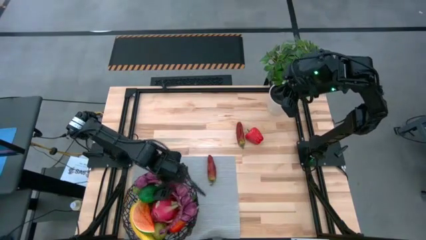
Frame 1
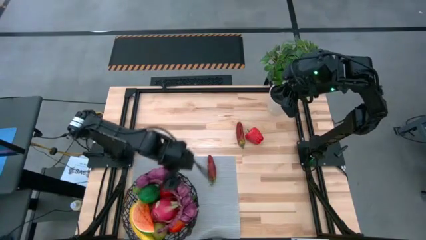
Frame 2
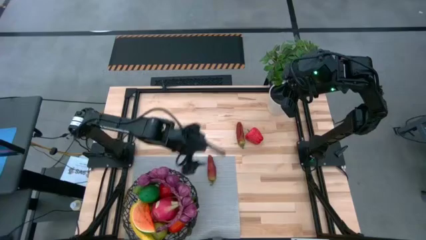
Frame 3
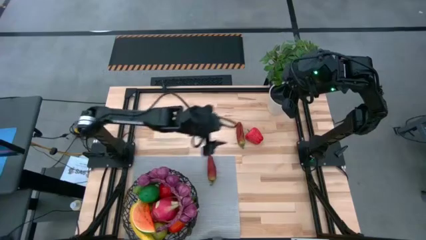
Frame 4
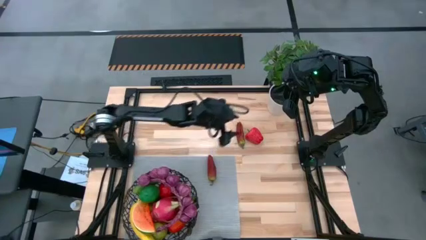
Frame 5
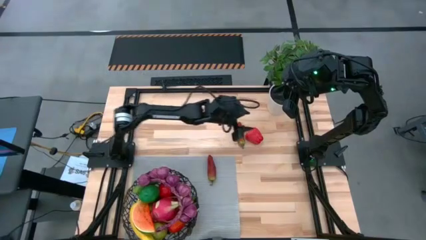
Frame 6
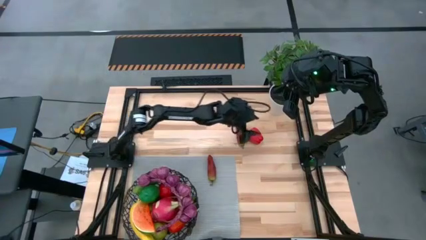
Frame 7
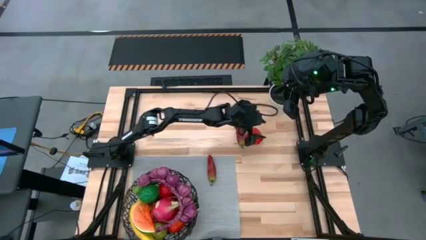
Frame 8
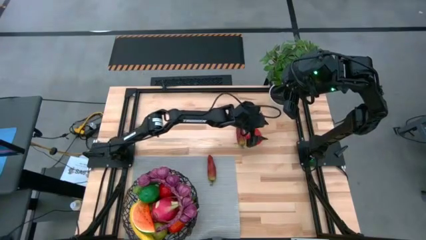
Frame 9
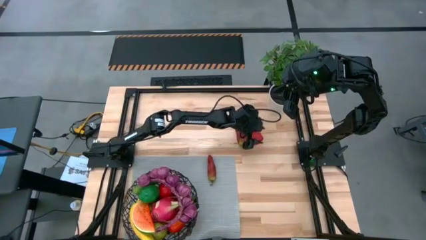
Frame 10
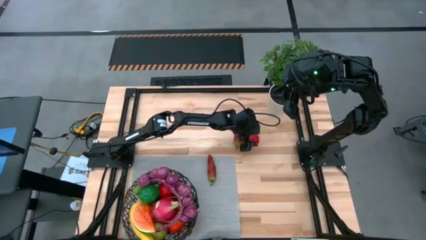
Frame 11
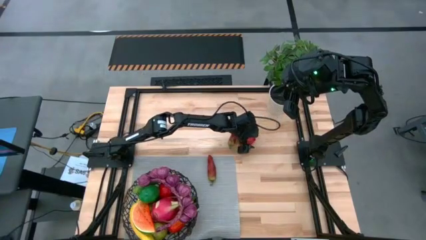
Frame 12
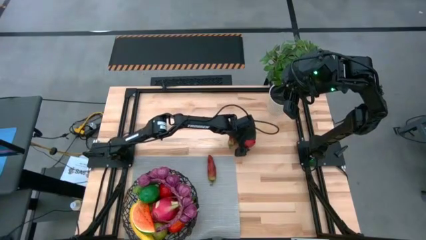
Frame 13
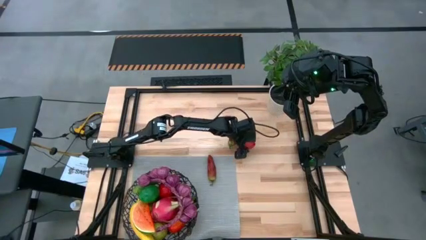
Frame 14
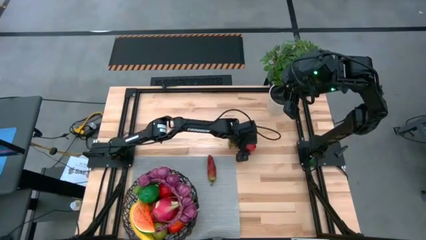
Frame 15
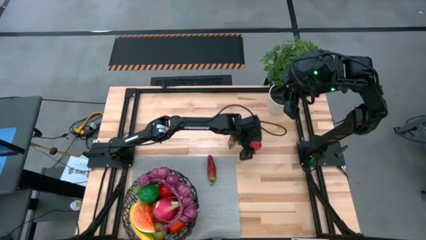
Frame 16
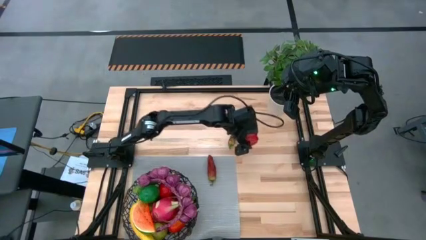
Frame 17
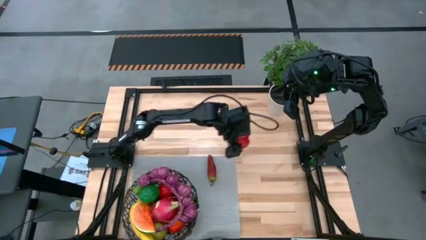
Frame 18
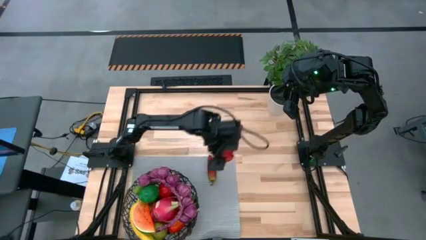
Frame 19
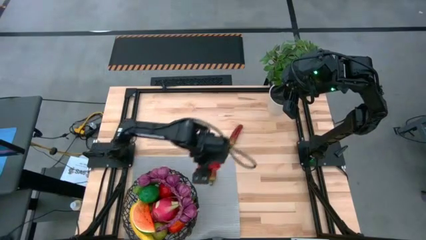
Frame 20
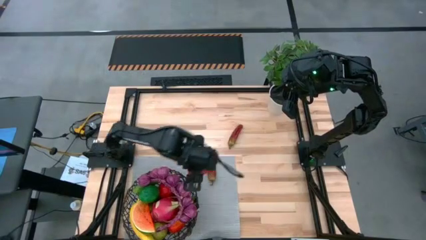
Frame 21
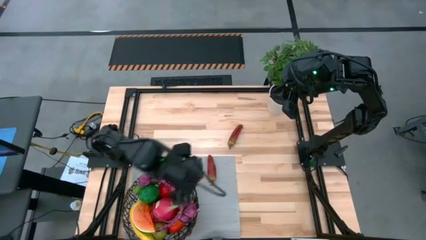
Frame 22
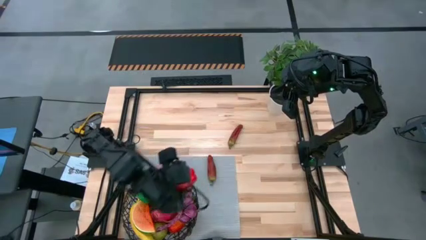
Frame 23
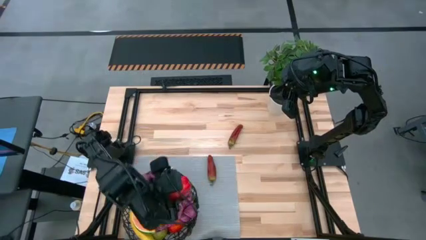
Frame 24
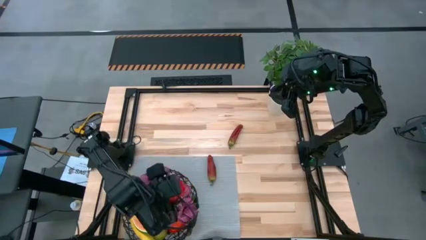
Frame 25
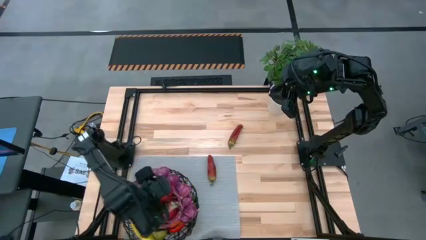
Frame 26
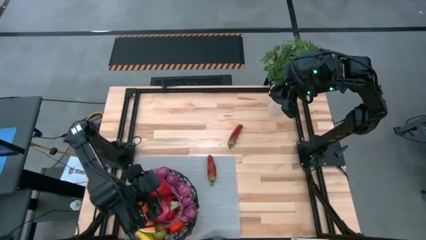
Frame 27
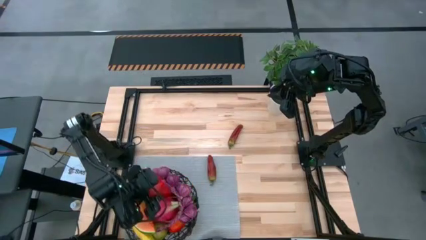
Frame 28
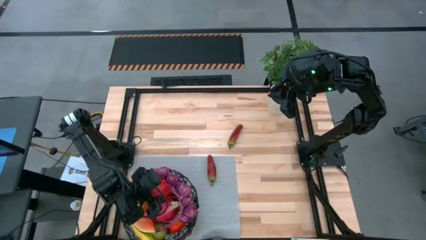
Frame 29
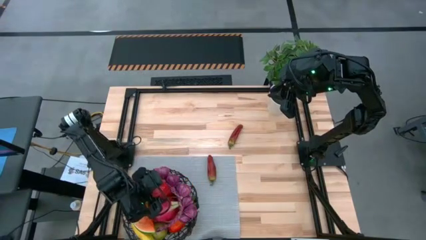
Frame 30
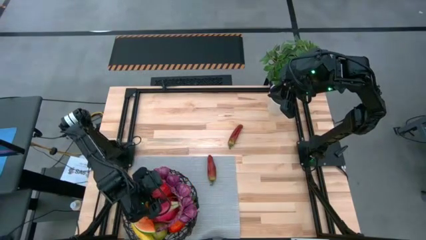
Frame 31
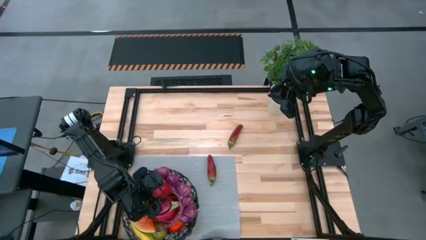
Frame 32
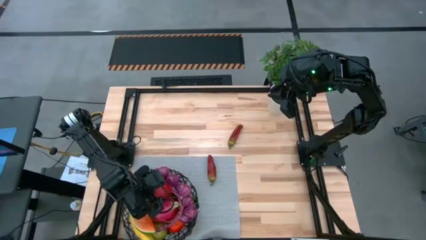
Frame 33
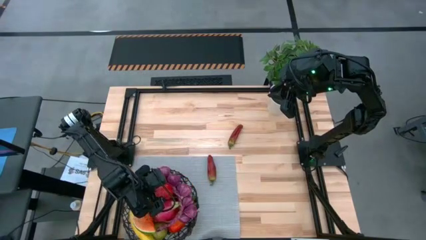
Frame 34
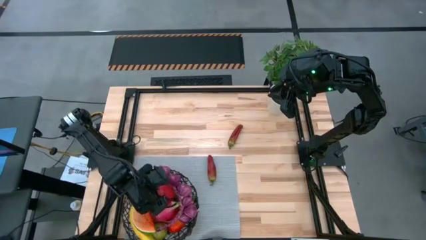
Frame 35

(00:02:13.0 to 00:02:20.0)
Task: Build produce basket
Put the red bell pepper into the black wire basket

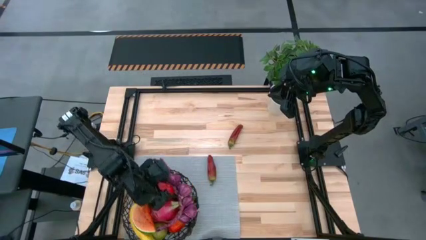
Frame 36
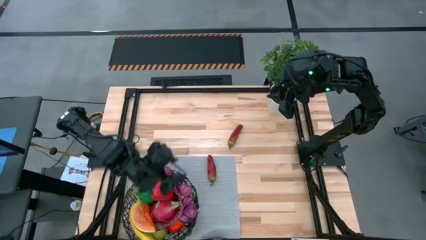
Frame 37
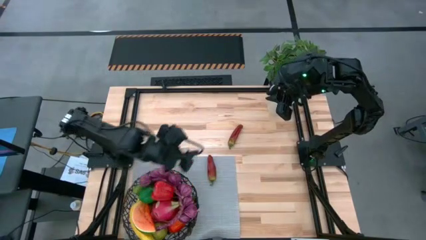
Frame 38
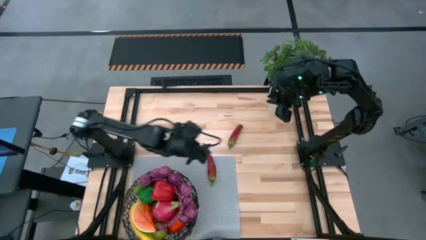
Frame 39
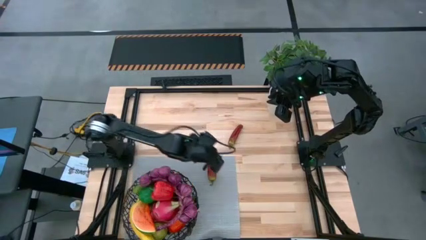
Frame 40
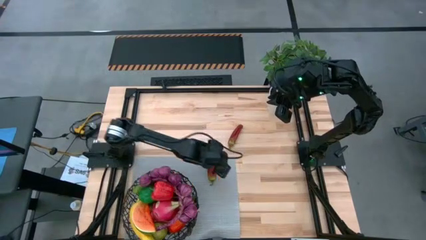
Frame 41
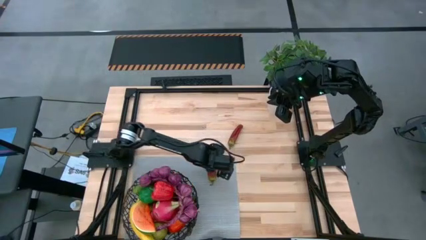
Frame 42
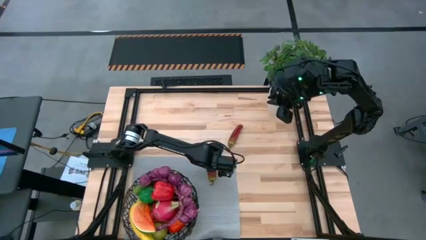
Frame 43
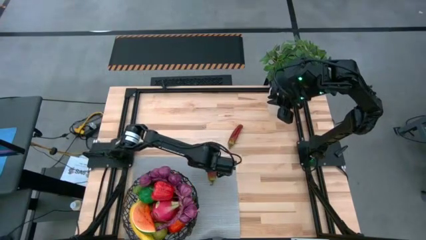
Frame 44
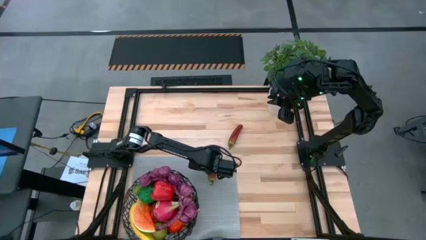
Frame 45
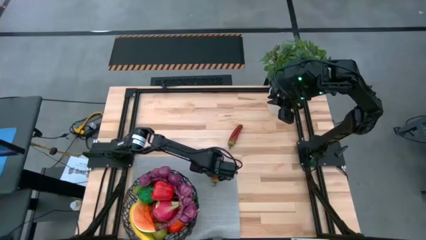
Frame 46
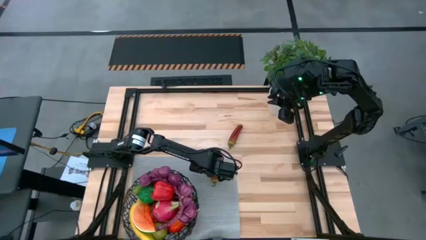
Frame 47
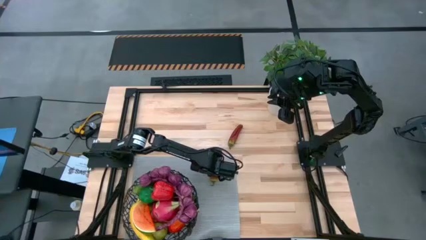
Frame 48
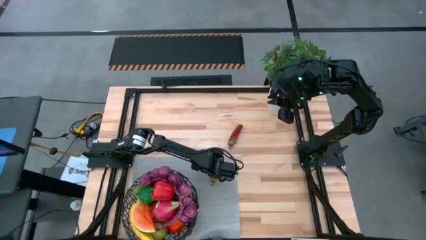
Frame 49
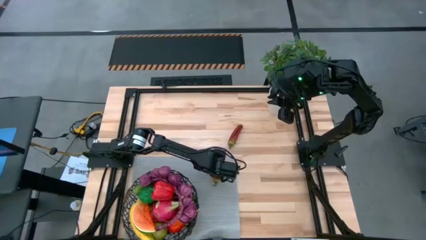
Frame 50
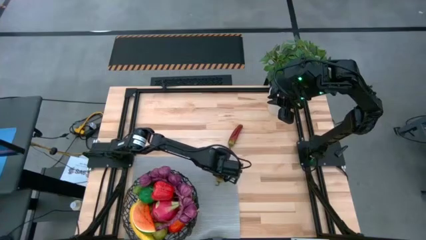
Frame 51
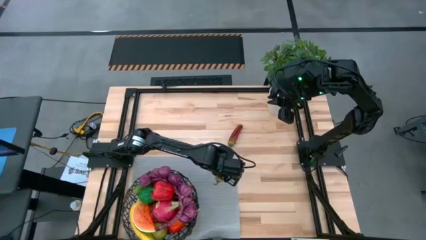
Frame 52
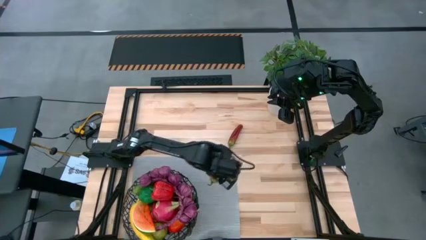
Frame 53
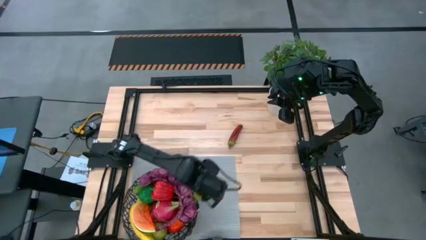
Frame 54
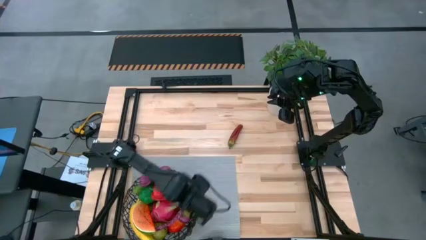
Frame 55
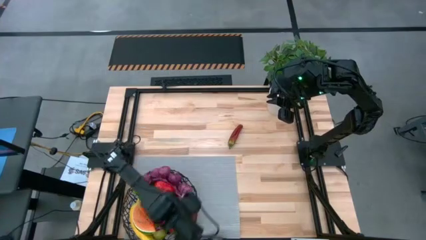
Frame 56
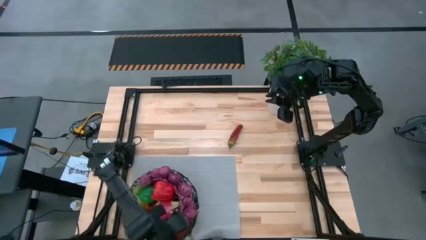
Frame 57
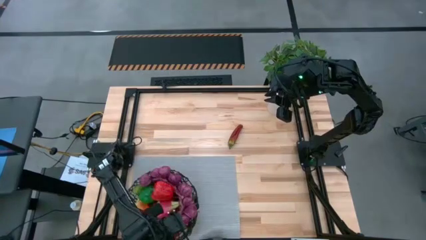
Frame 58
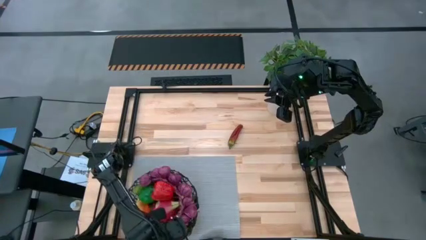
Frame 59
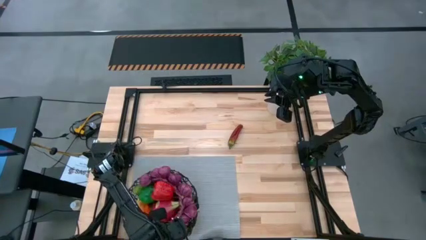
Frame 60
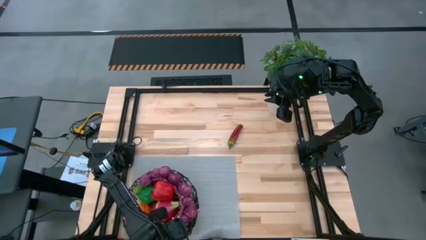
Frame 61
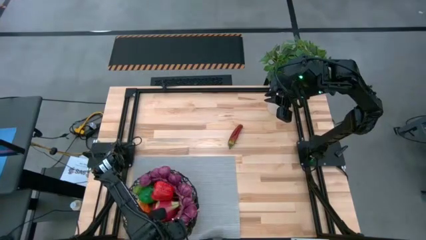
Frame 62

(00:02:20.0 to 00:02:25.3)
Put the bottom red chili pepper into the black wire basket

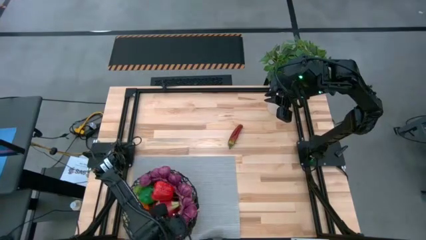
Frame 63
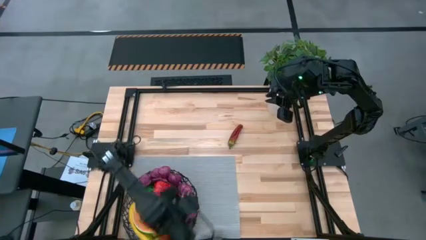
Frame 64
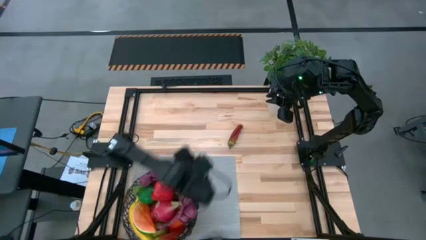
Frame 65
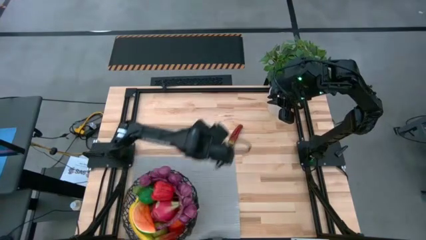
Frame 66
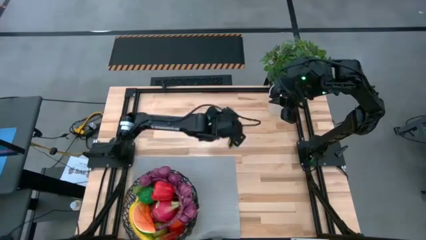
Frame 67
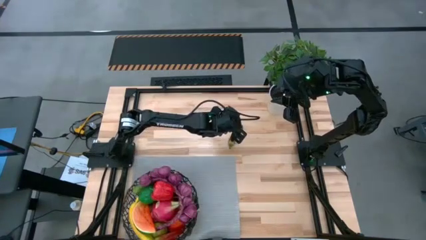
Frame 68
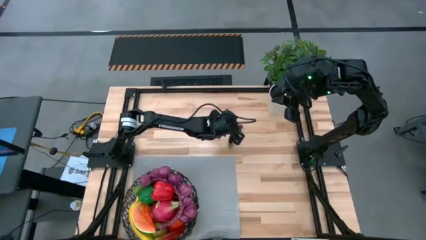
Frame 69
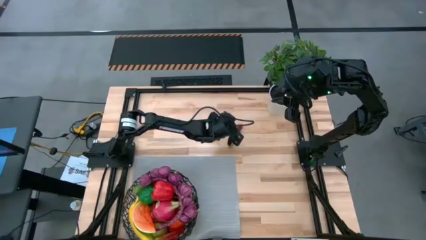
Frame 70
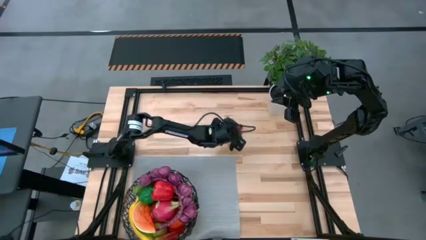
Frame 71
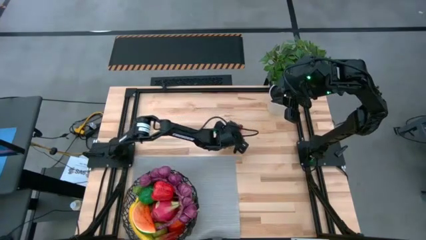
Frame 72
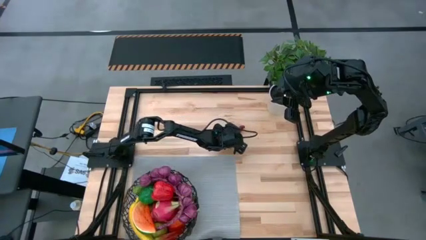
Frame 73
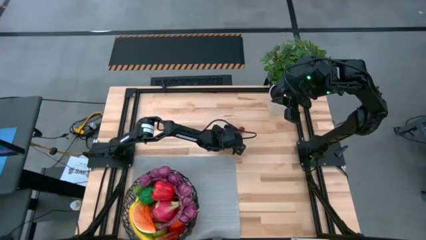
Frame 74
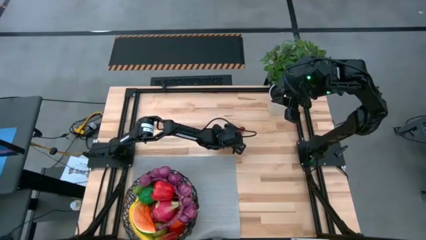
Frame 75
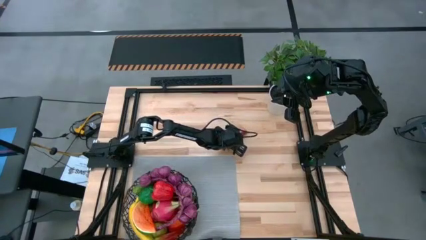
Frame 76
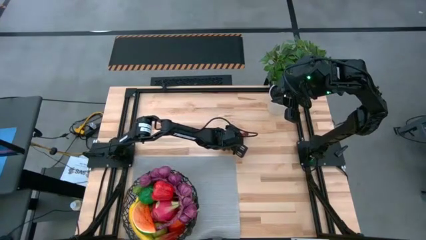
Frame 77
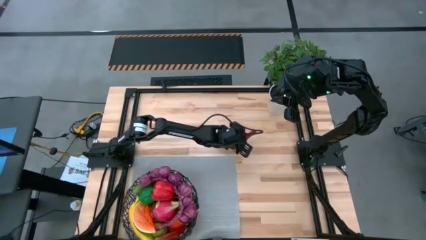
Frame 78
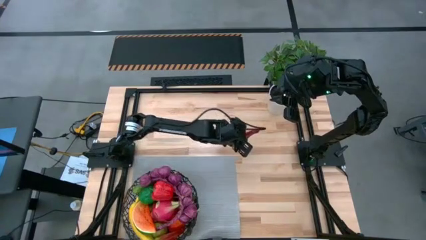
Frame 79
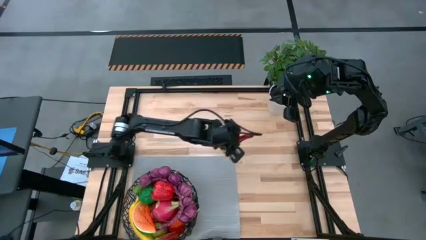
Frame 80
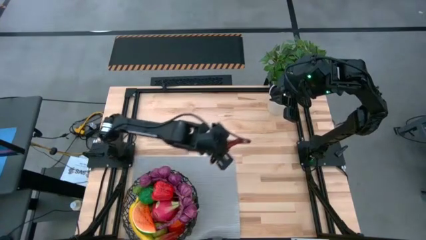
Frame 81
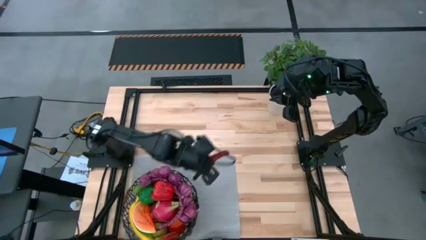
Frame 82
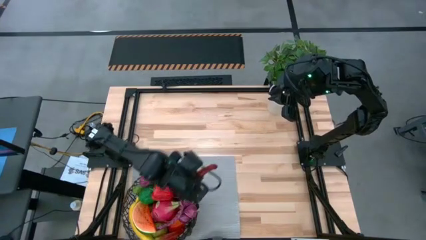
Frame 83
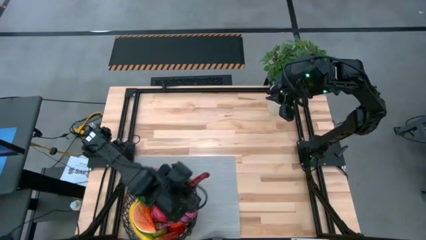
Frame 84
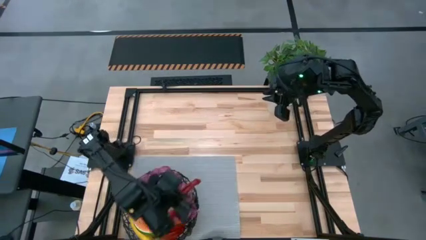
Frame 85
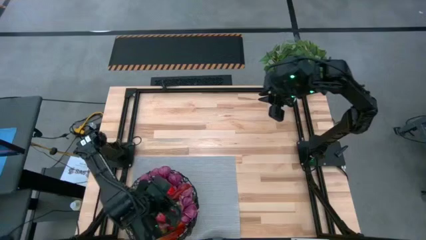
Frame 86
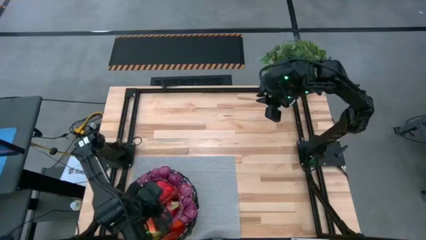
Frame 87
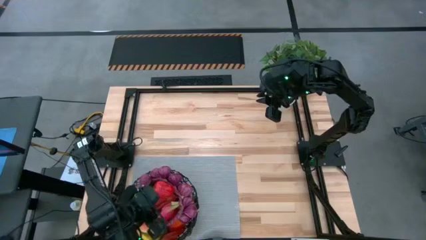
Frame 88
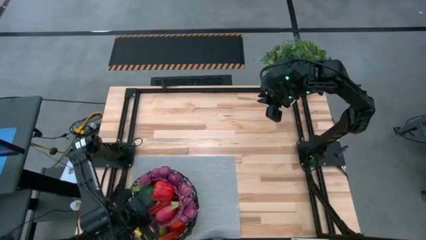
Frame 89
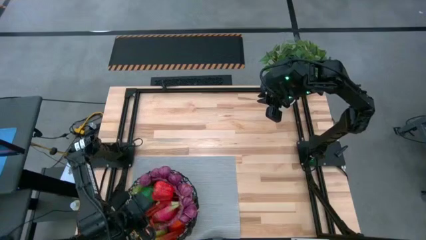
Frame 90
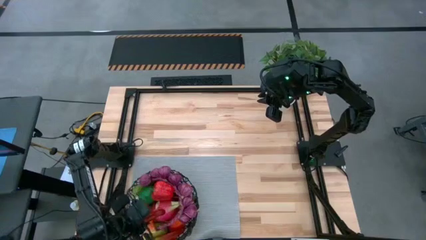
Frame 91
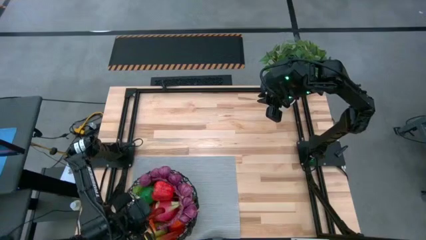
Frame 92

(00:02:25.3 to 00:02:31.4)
Put the red chili pepper into the black wire basket
